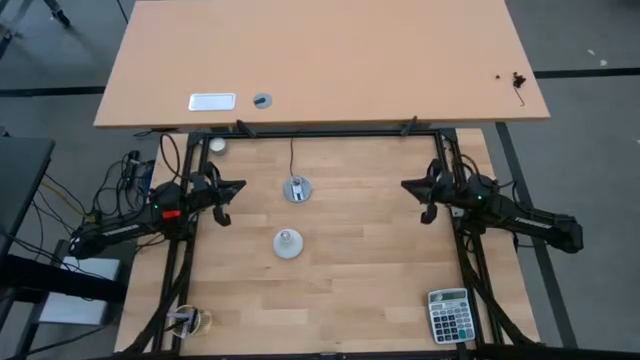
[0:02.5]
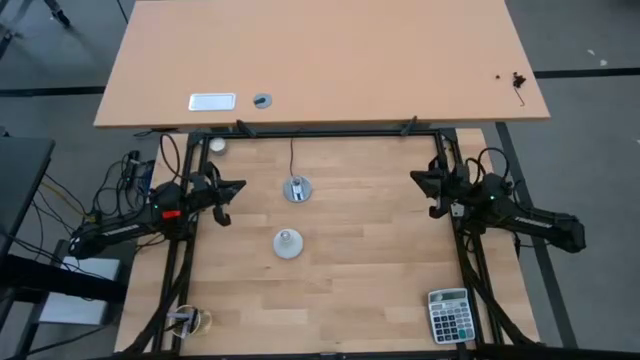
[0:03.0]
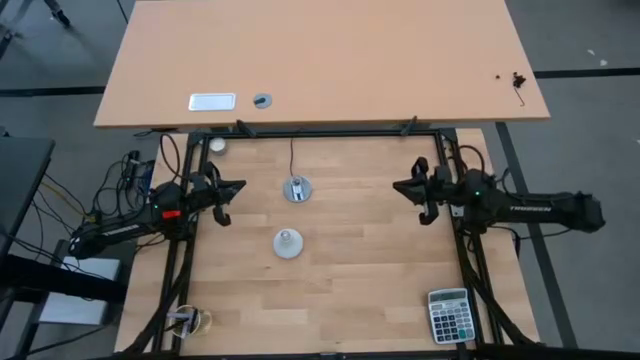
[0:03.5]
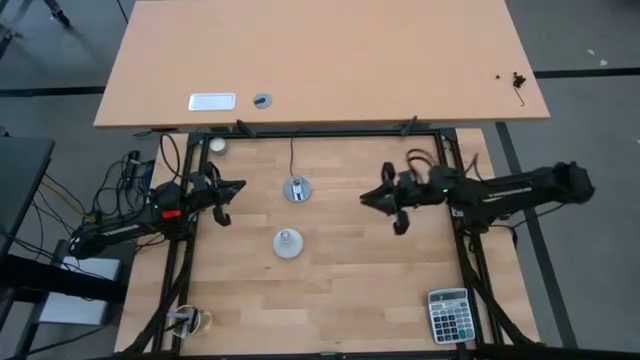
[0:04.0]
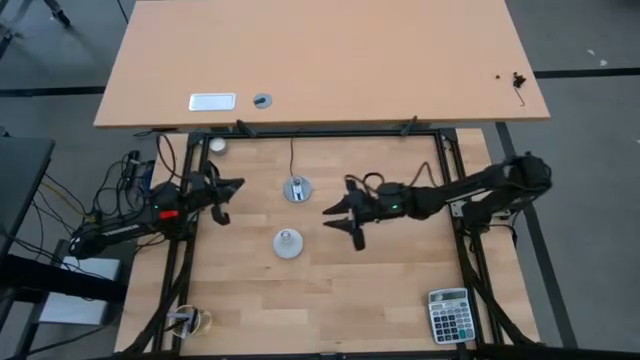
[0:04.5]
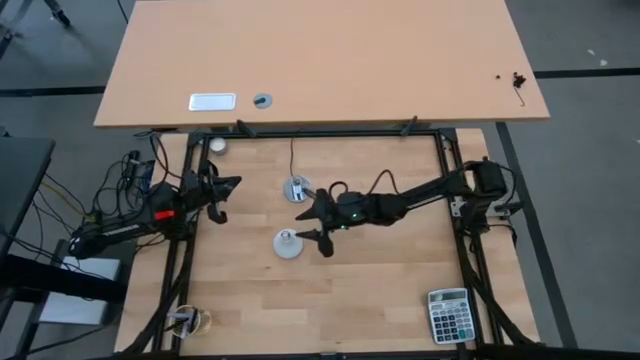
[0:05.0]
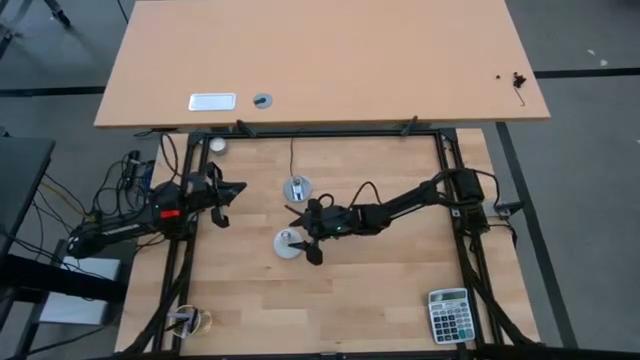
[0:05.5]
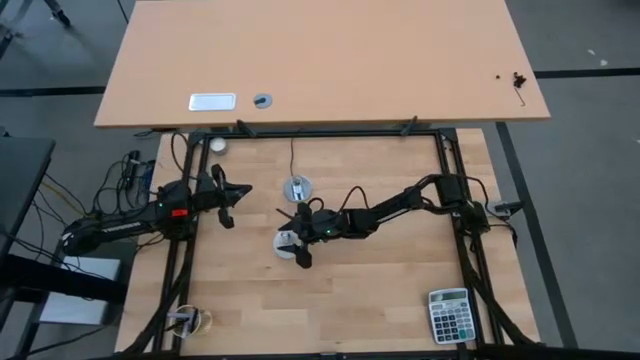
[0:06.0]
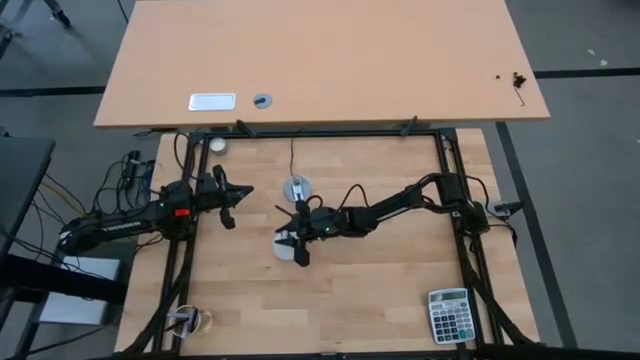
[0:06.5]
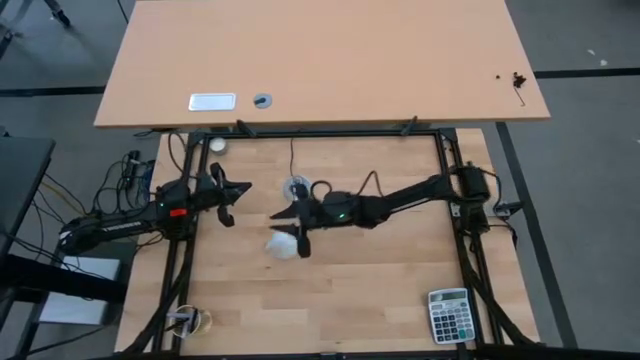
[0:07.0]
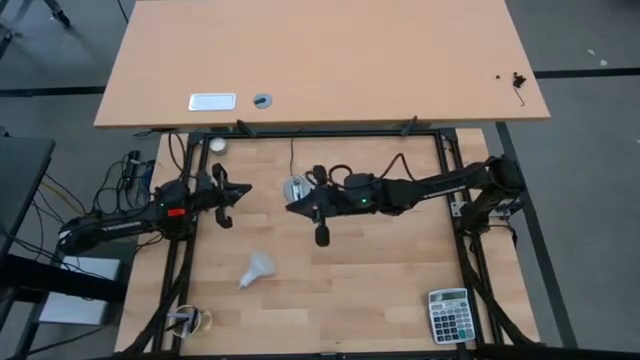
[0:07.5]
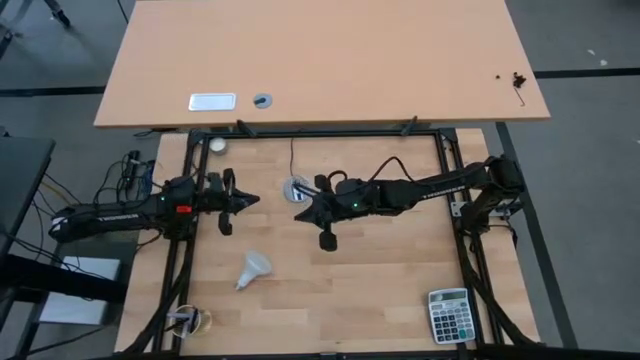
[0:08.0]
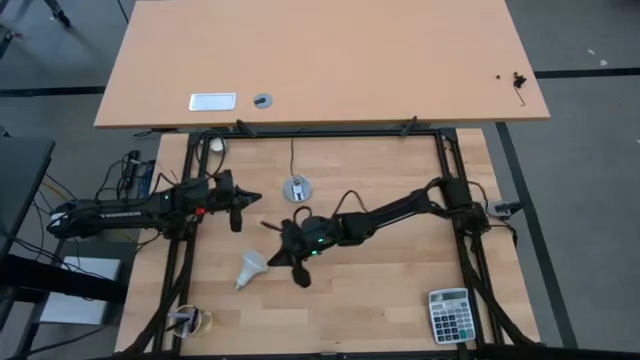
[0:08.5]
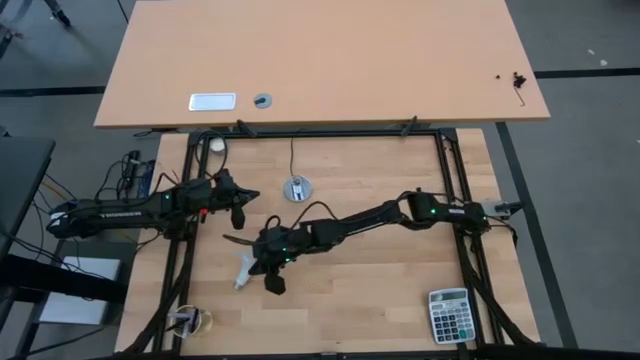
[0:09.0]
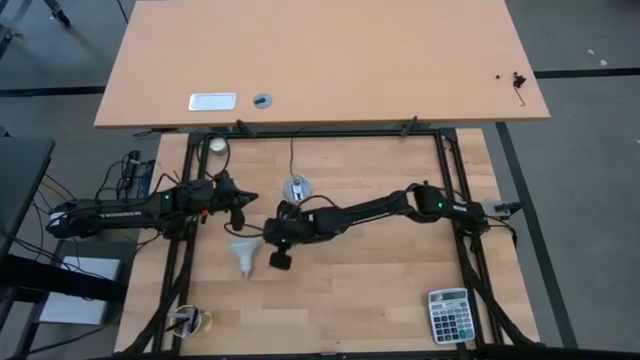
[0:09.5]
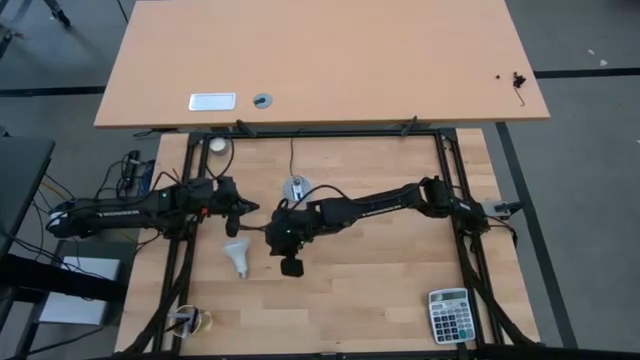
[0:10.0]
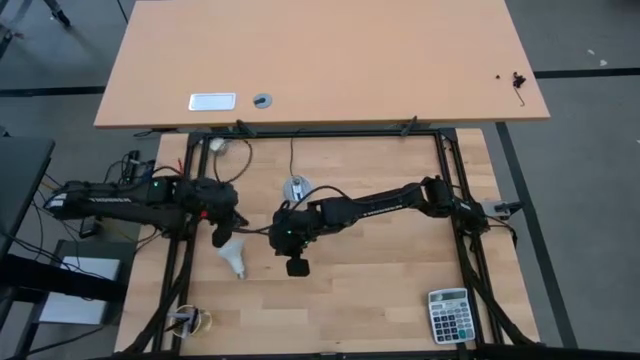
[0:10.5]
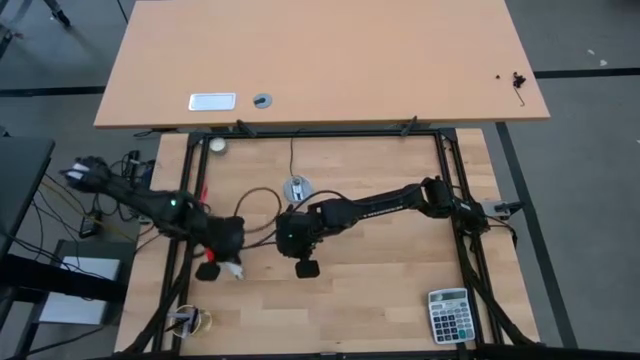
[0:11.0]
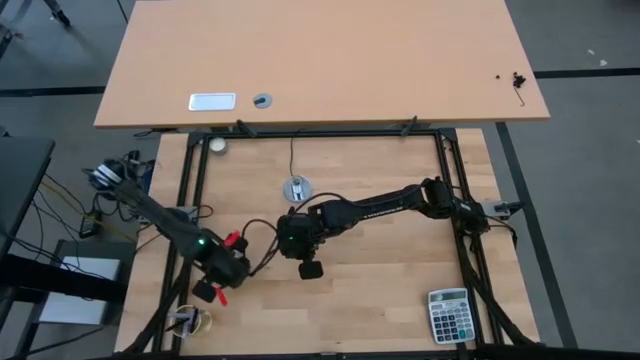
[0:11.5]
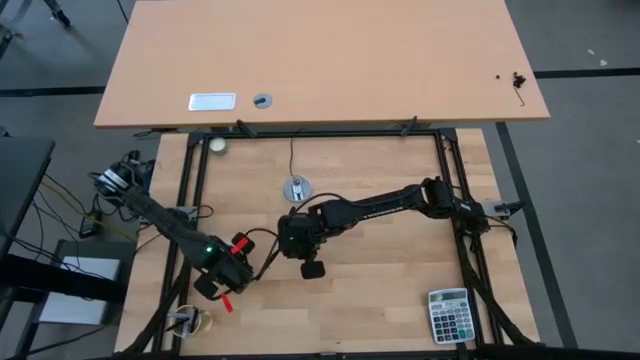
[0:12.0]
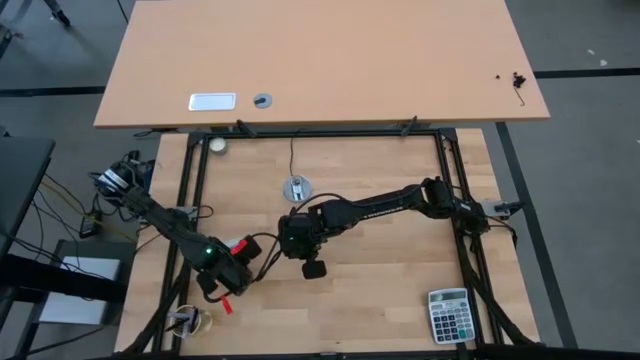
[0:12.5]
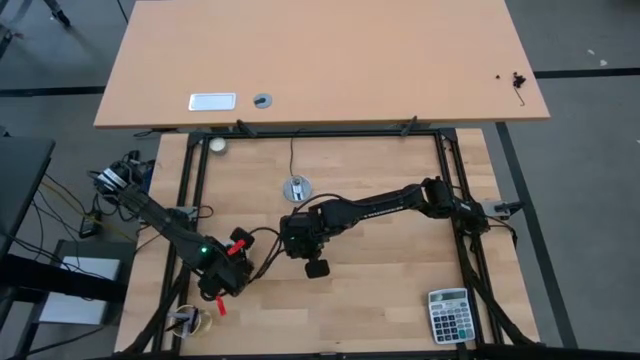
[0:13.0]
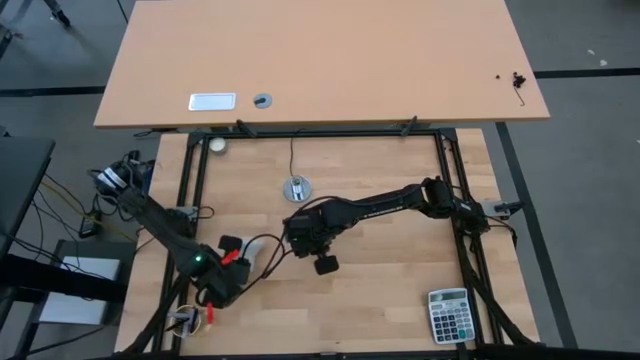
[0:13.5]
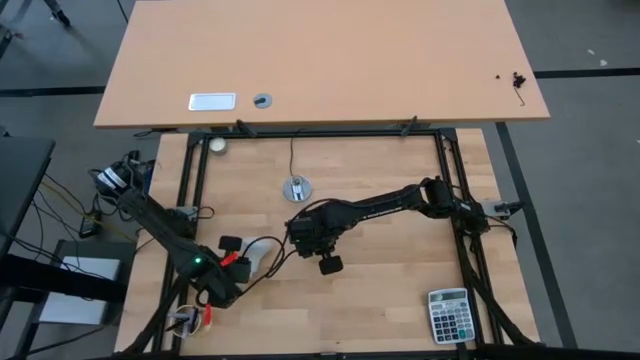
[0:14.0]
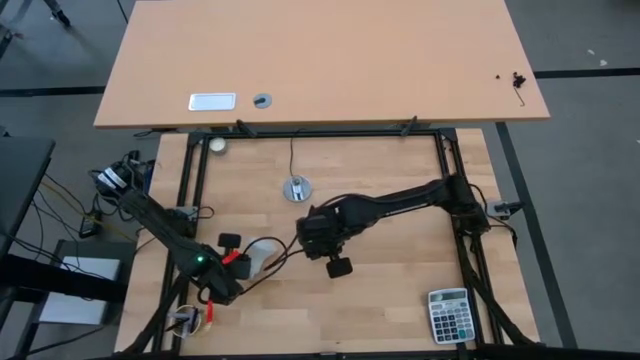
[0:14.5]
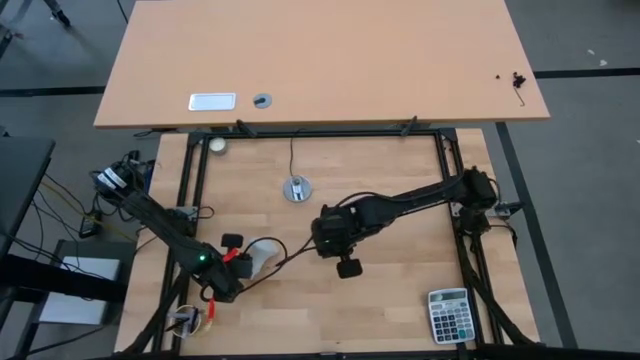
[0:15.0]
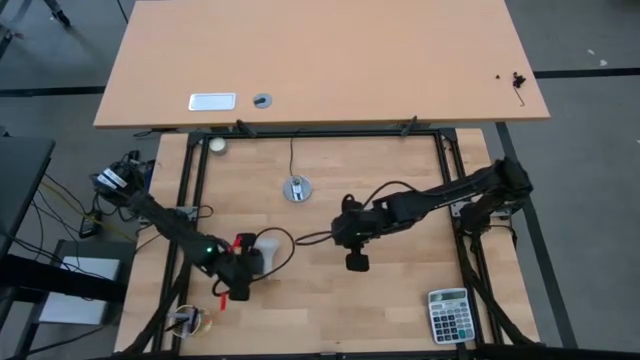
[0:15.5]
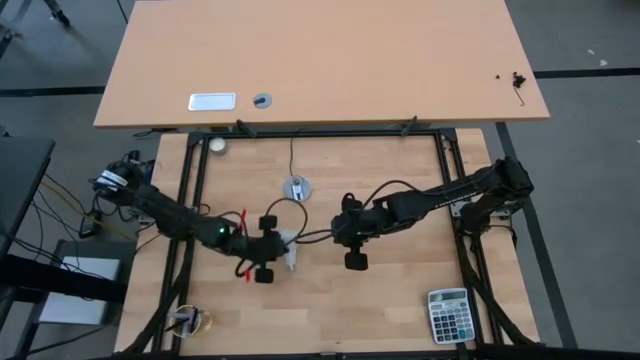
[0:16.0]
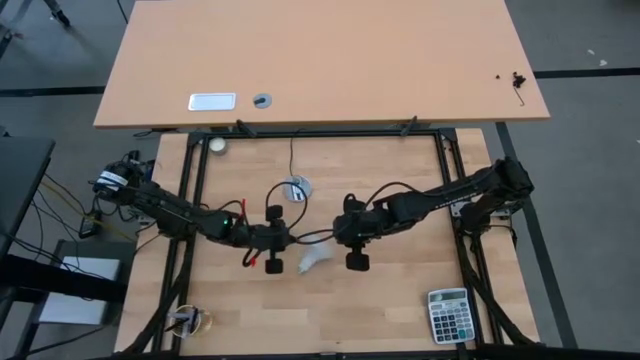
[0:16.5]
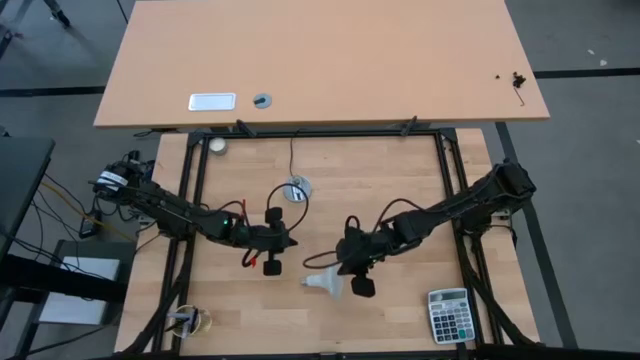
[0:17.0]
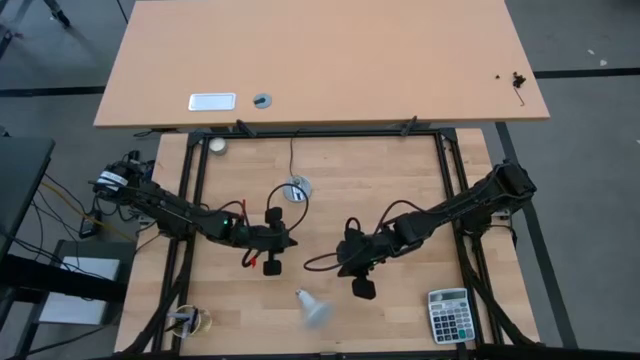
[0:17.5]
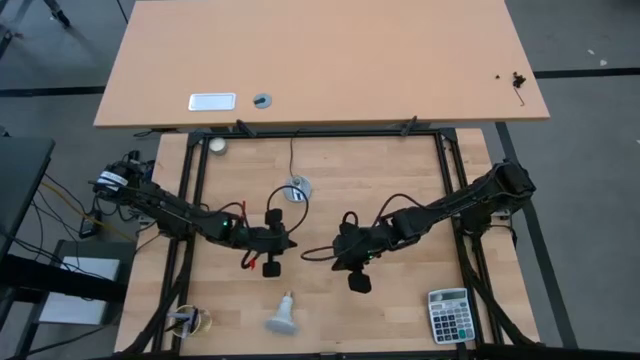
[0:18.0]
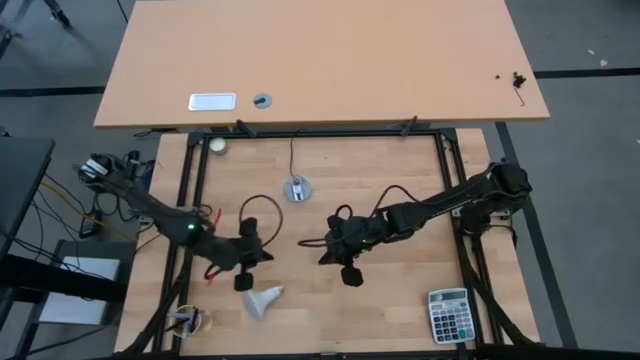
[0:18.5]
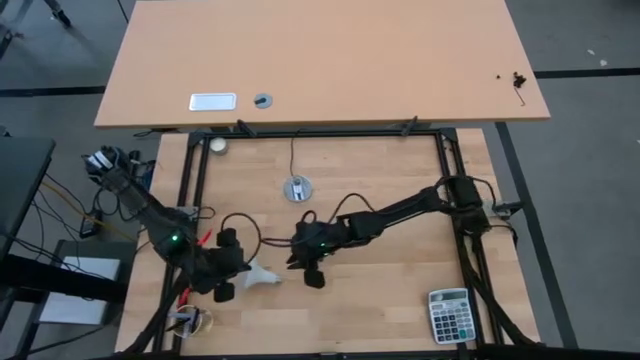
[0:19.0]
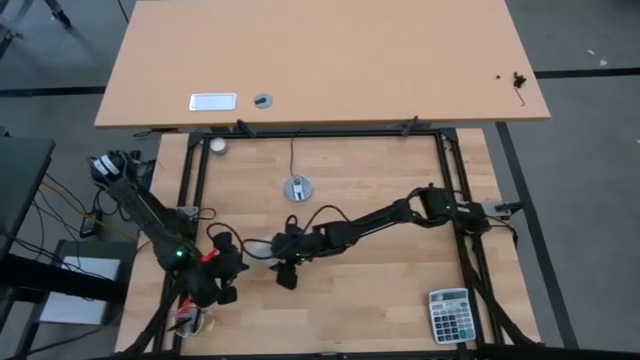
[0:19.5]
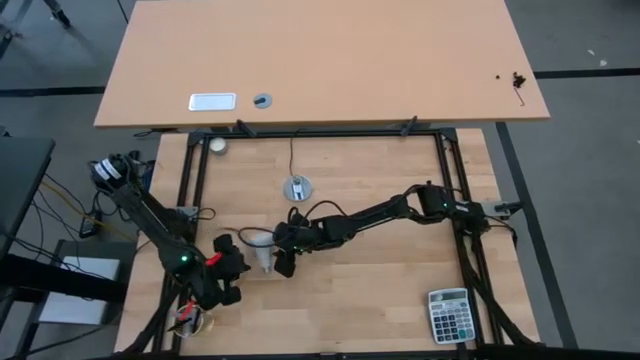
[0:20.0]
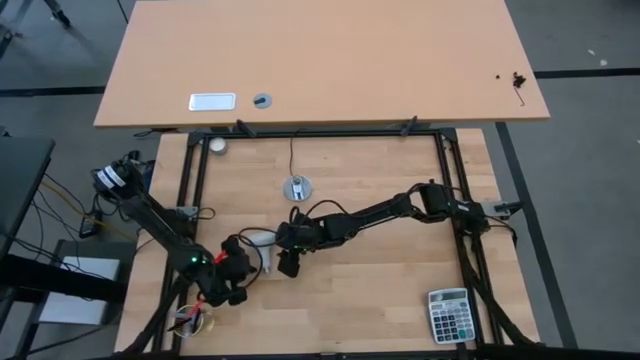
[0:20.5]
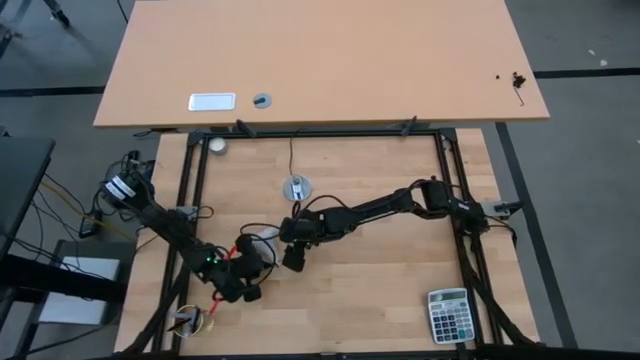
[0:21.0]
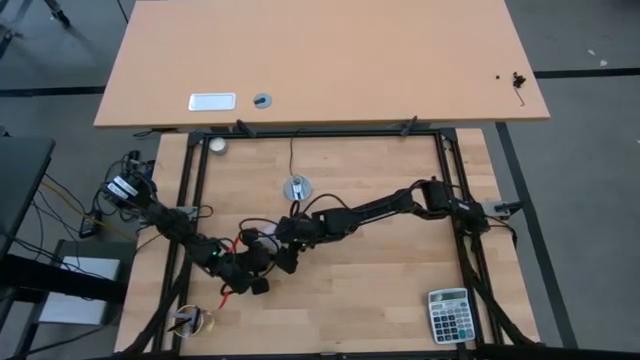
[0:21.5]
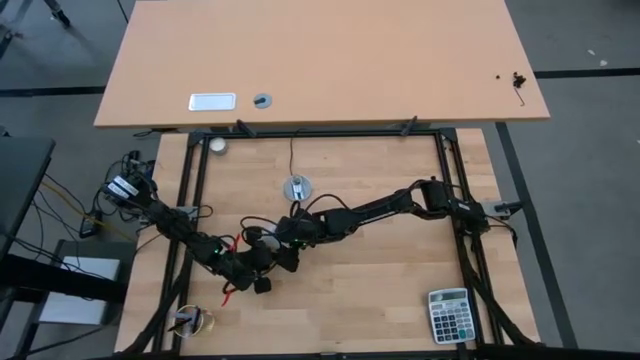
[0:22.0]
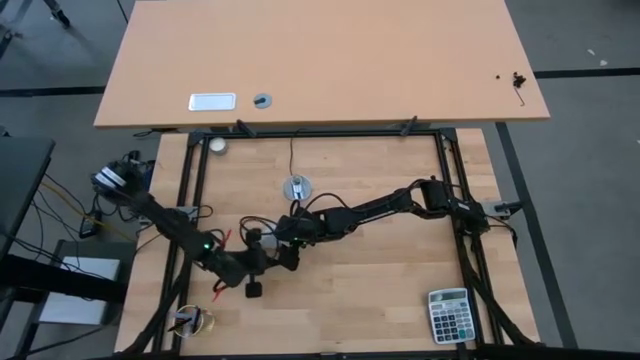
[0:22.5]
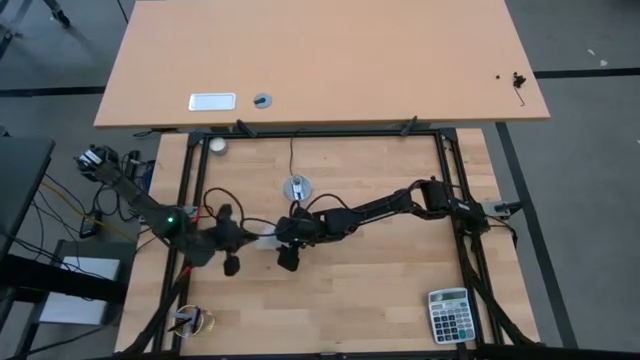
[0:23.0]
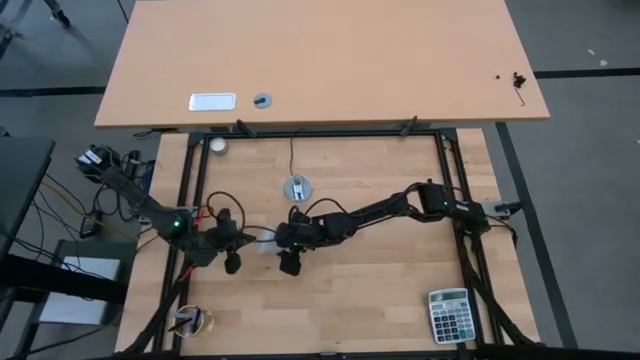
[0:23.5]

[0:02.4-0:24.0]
Task: Screw lightbulb
Insert the white light bulb into the silver lamp
